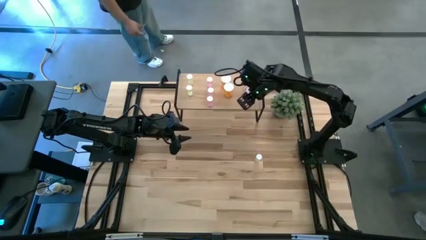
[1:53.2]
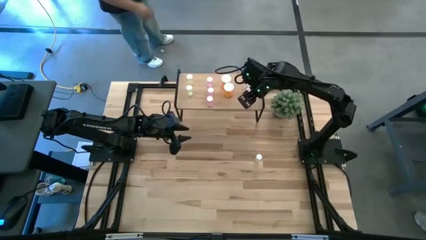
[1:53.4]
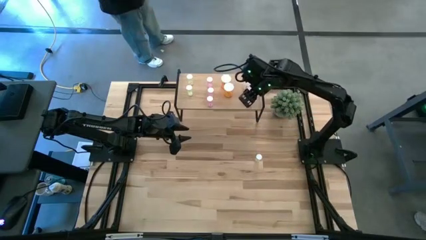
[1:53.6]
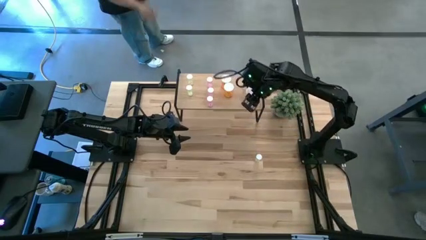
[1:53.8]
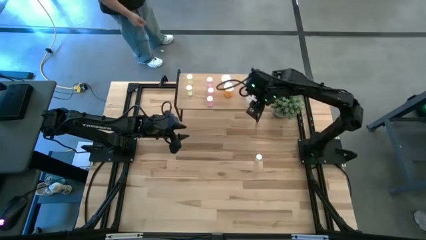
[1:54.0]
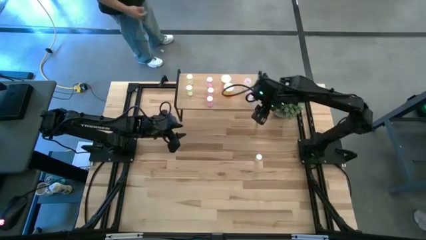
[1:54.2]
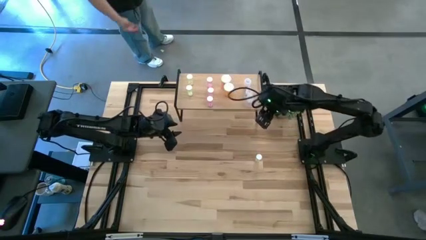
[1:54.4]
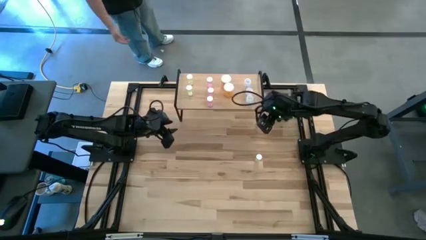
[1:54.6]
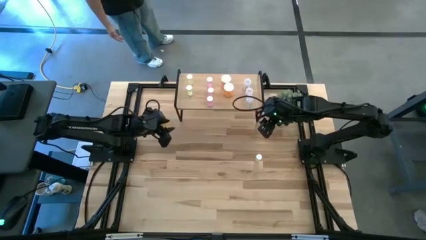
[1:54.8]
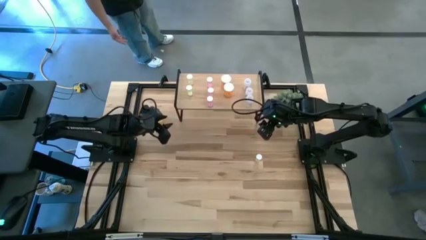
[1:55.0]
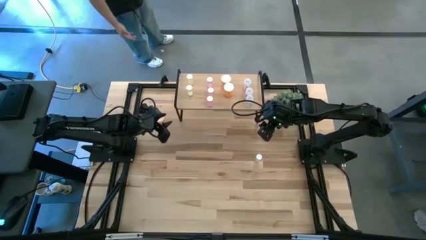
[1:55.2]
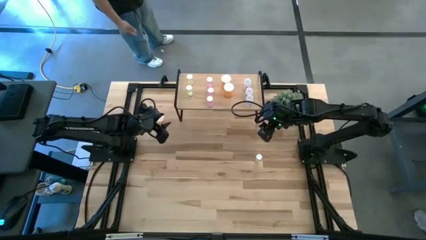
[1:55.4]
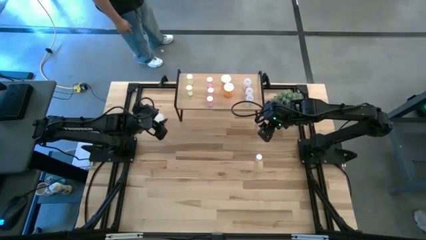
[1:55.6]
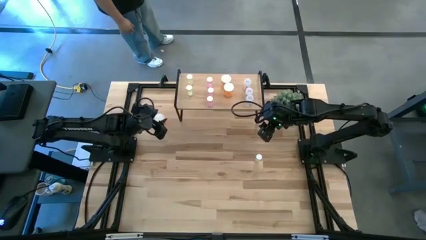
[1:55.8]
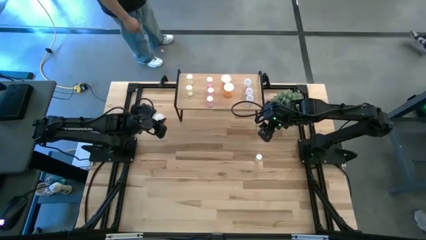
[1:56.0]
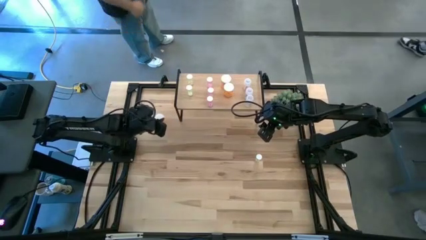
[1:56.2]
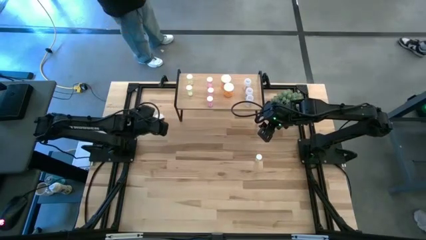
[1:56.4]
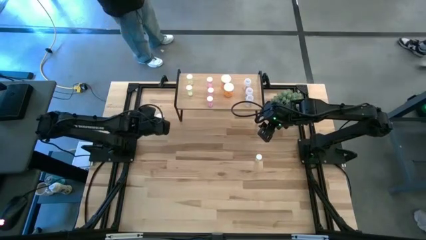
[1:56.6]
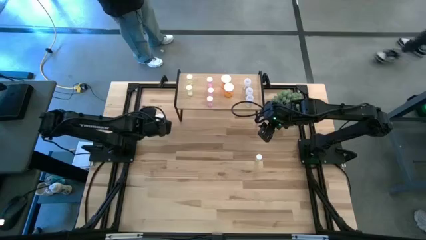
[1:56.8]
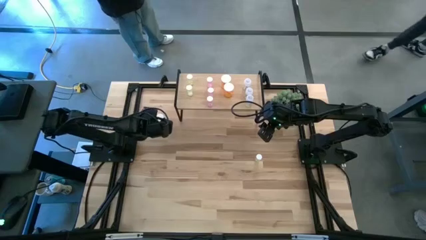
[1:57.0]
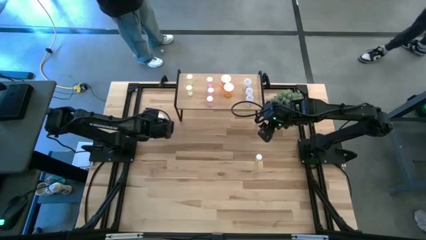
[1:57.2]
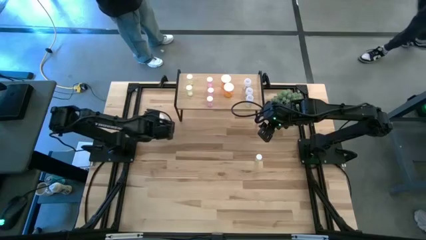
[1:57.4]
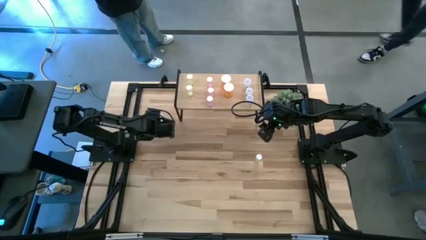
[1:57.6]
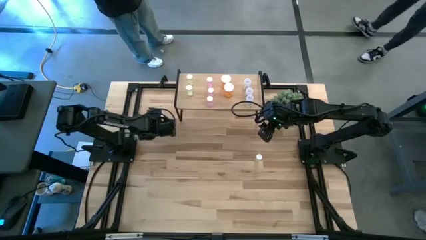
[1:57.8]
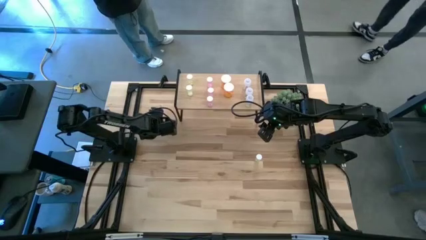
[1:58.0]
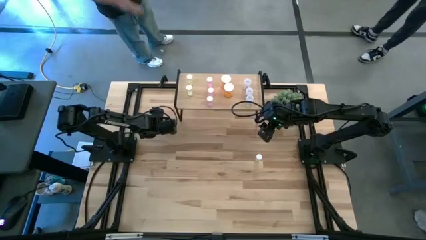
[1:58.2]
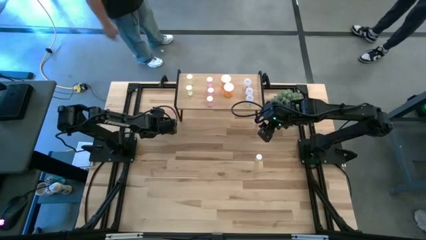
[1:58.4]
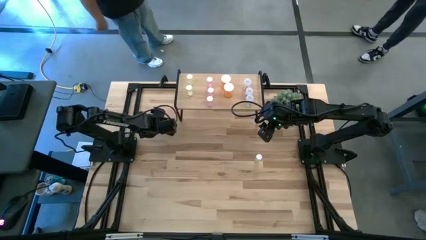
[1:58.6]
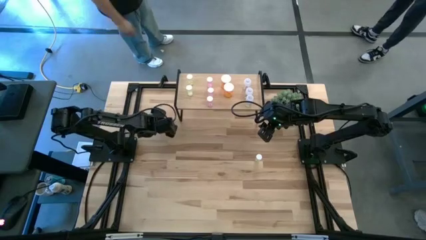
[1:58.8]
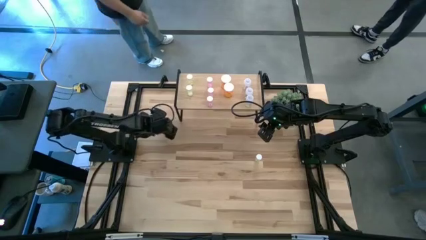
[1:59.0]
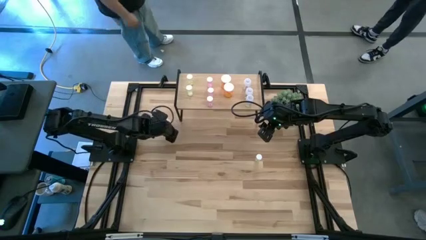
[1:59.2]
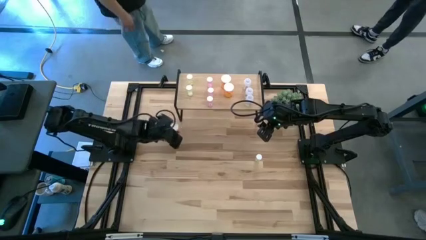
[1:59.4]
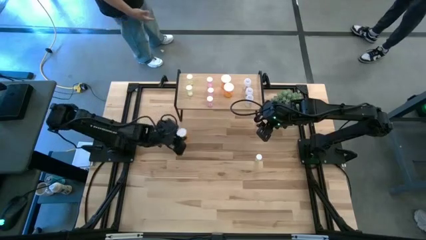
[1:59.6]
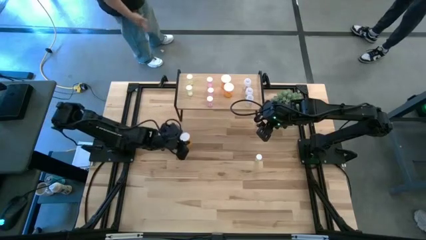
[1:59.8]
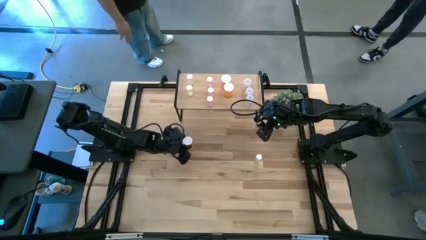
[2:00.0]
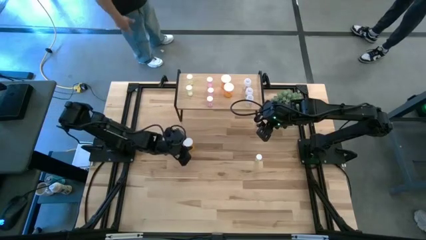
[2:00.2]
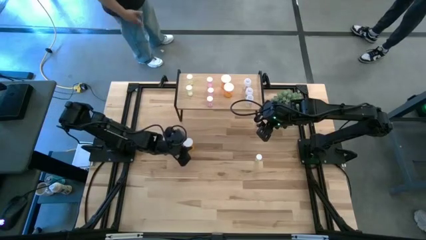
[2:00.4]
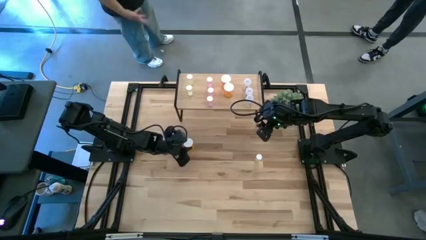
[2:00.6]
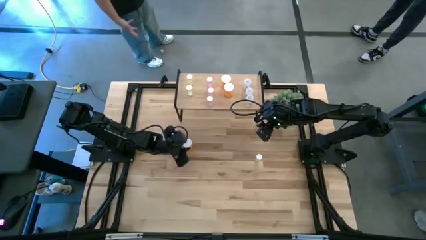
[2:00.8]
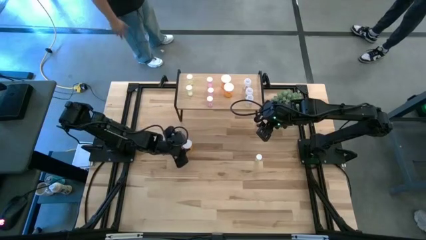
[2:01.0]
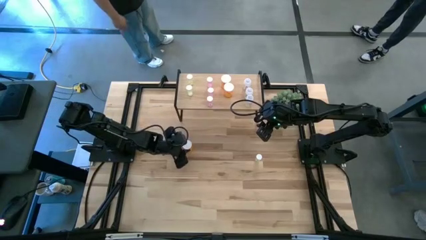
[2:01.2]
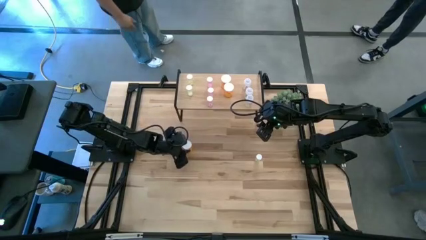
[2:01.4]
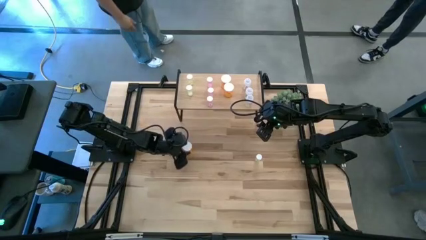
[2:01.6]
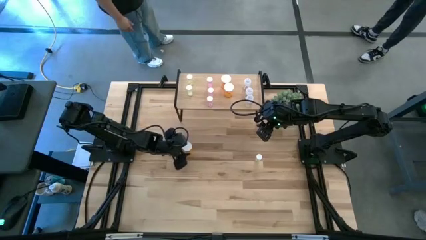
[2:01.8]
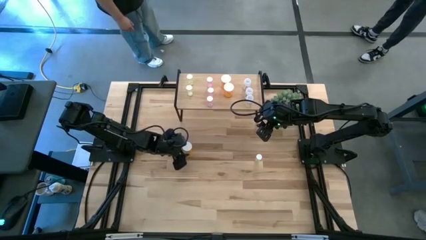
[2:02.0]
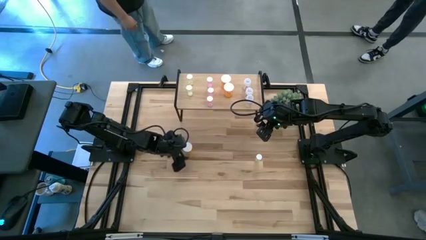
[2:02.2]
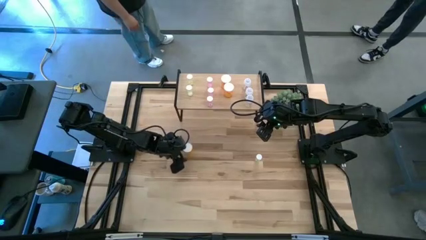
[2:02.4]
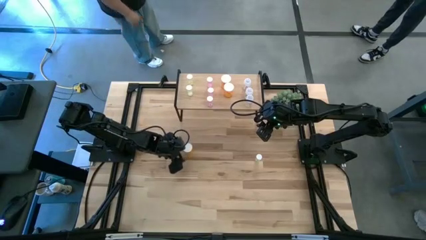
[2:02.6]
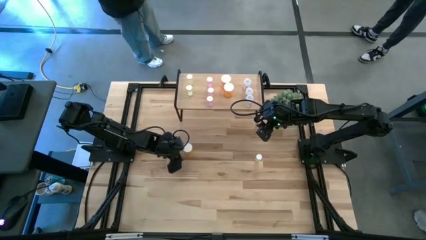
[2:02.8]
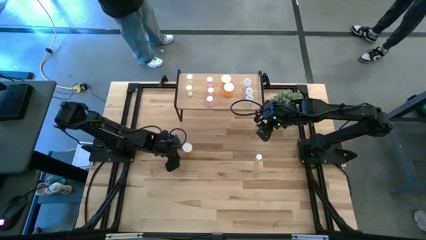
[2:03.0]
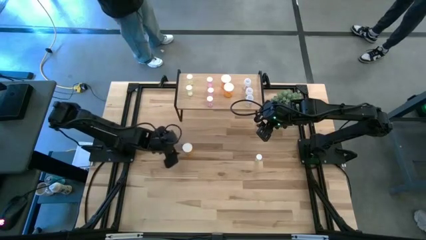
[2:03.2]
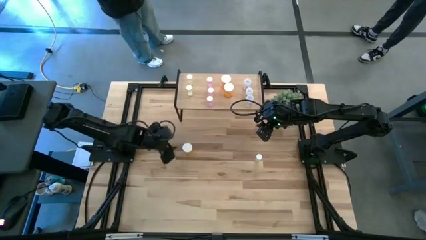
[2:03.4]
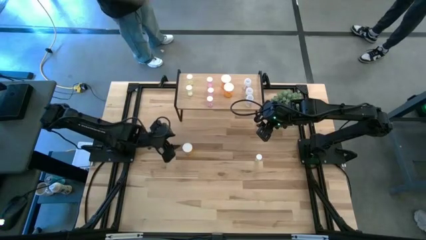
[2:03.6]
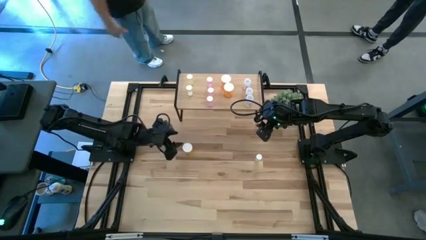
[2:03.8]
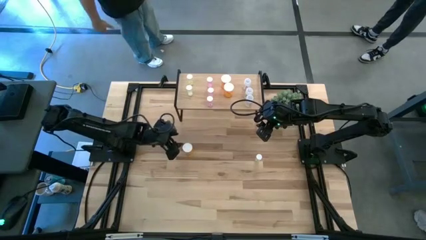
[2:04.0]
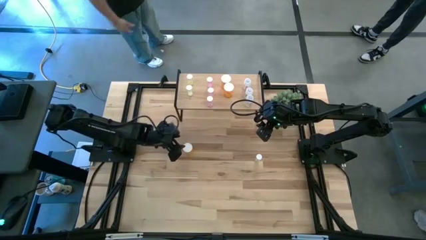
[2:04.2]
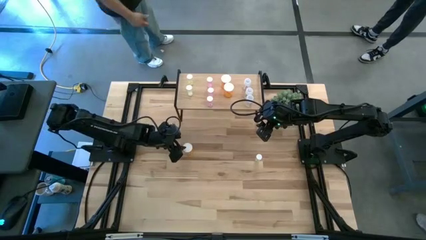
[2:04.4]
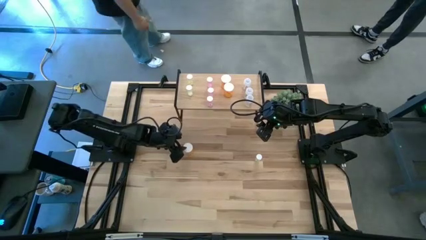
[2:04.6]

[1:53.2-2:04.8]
Task: Pick and place medicine bottles onto shelf by color
Put the orange pill bottle aligned with the other orange pill bottles on the shelf
